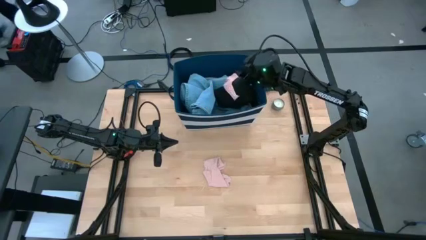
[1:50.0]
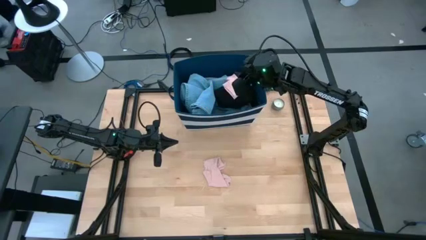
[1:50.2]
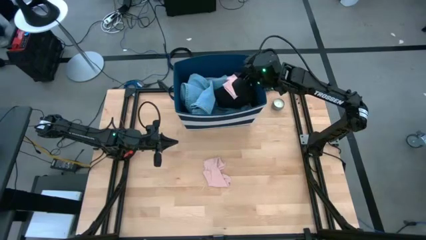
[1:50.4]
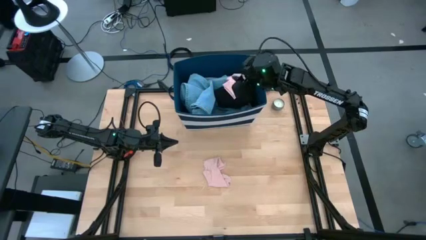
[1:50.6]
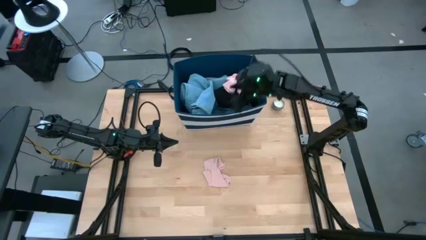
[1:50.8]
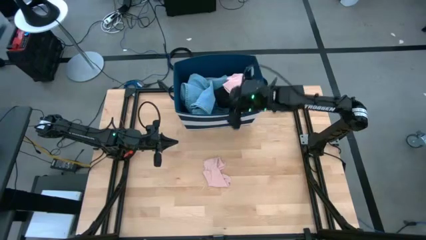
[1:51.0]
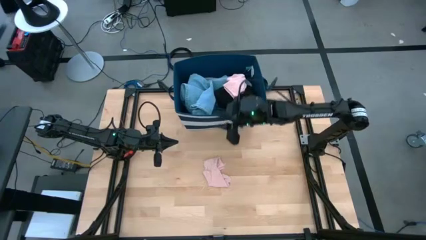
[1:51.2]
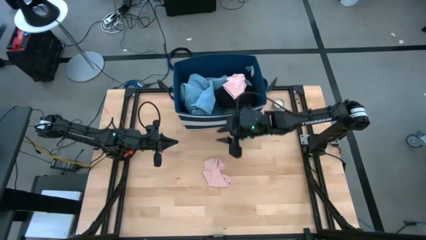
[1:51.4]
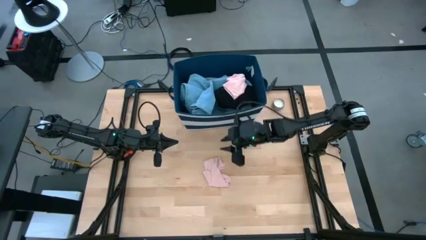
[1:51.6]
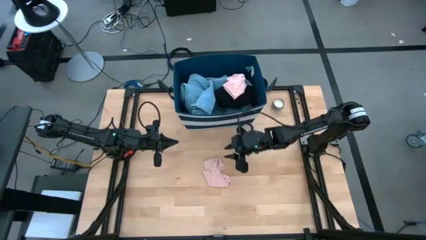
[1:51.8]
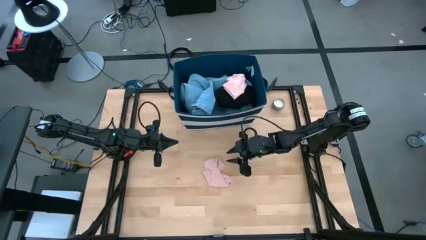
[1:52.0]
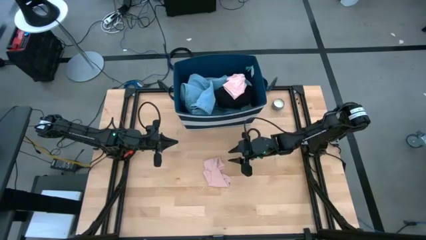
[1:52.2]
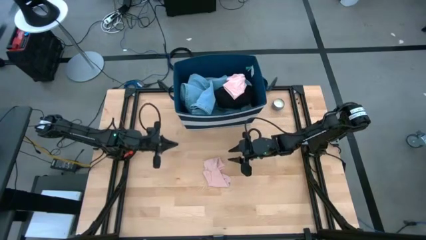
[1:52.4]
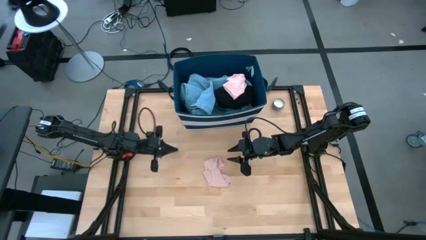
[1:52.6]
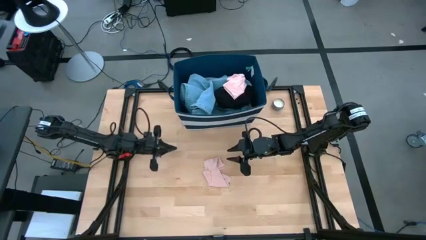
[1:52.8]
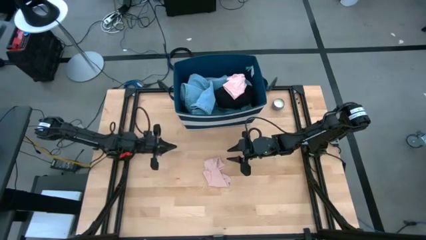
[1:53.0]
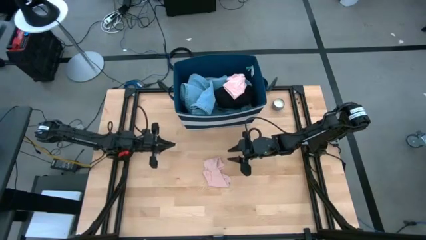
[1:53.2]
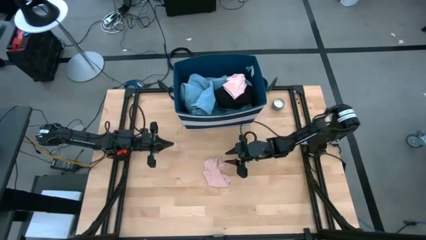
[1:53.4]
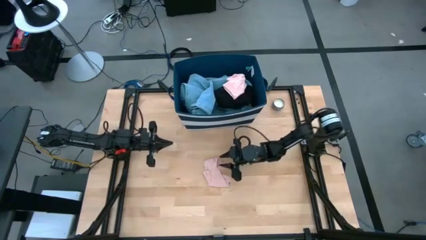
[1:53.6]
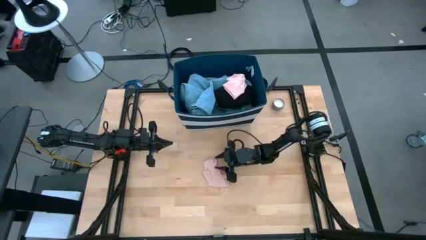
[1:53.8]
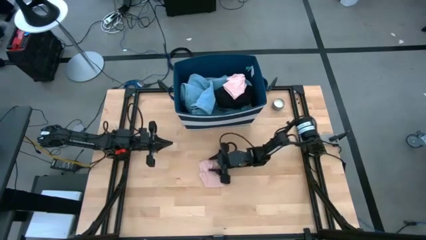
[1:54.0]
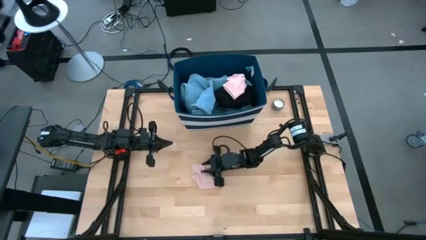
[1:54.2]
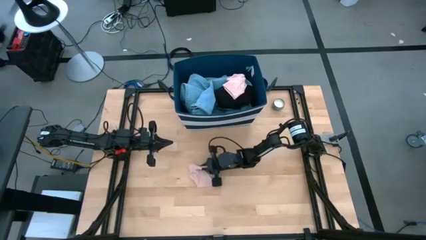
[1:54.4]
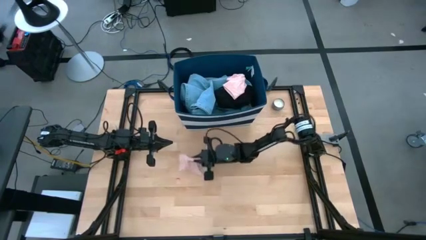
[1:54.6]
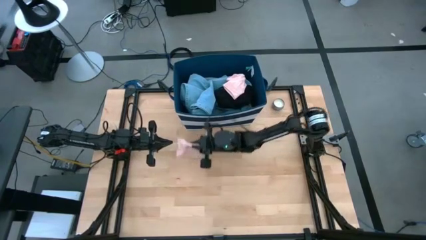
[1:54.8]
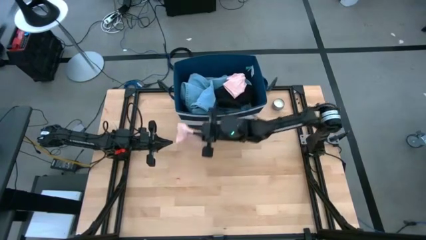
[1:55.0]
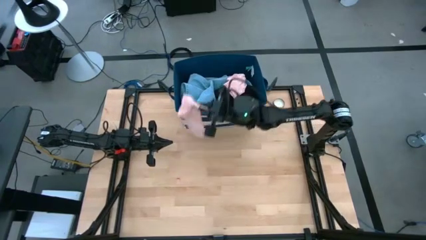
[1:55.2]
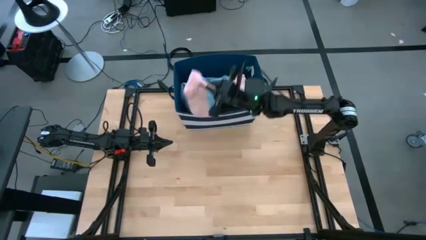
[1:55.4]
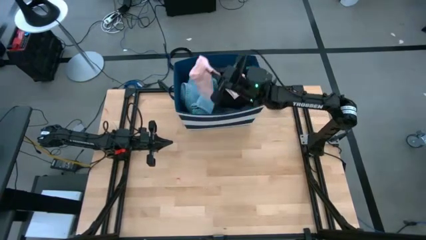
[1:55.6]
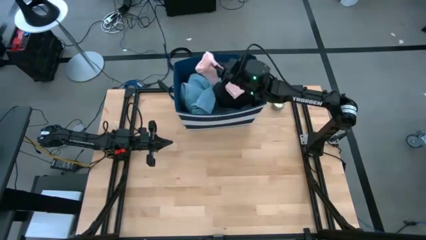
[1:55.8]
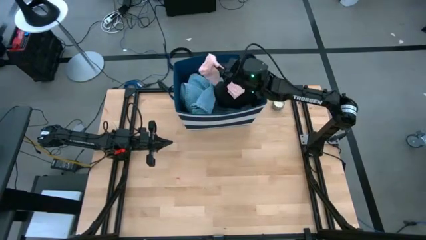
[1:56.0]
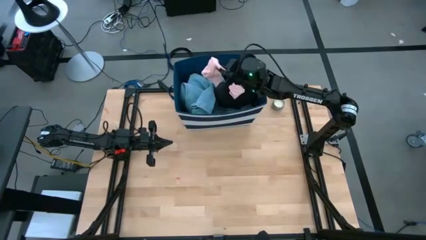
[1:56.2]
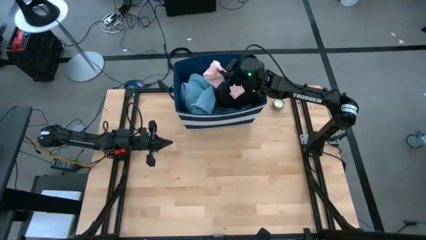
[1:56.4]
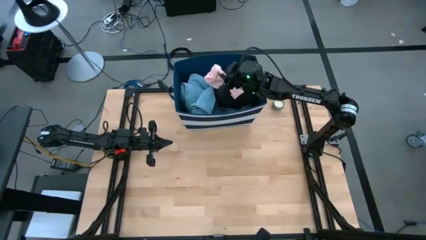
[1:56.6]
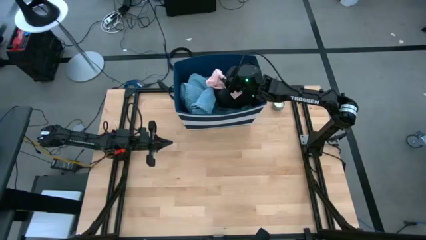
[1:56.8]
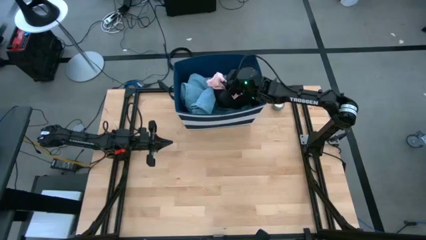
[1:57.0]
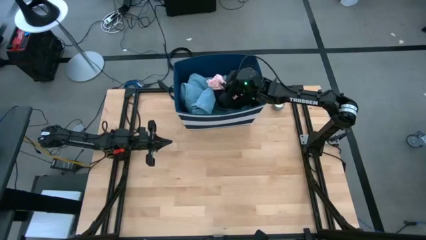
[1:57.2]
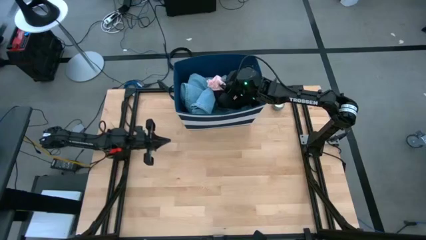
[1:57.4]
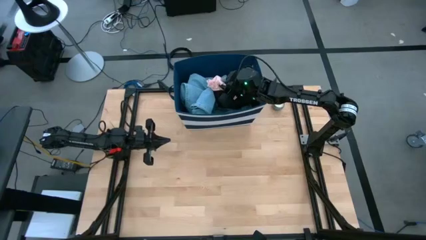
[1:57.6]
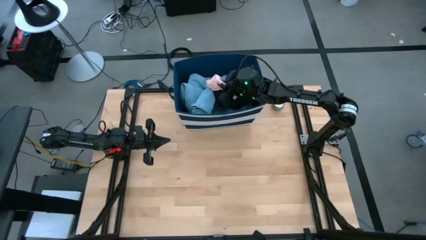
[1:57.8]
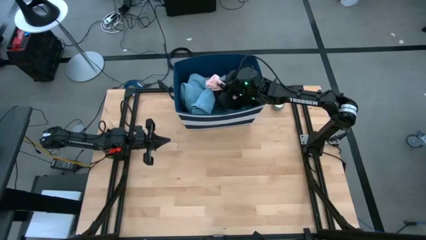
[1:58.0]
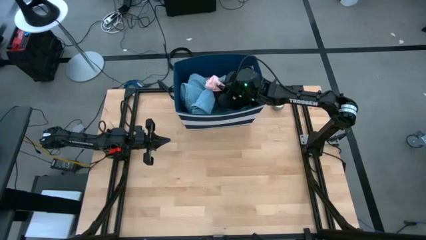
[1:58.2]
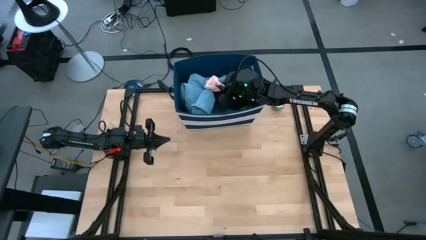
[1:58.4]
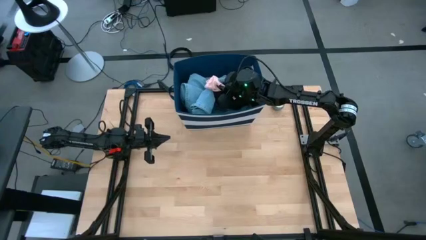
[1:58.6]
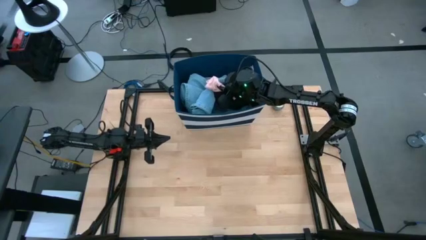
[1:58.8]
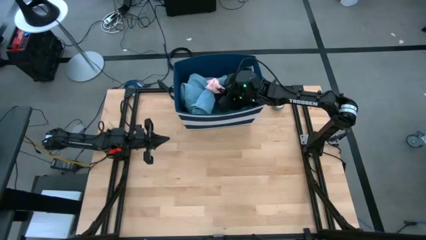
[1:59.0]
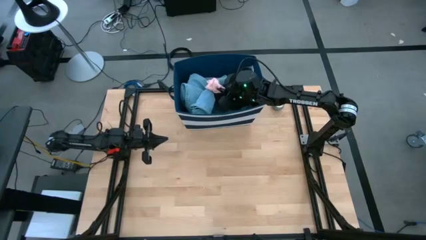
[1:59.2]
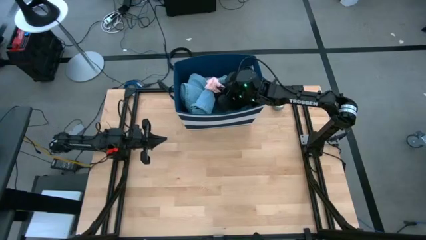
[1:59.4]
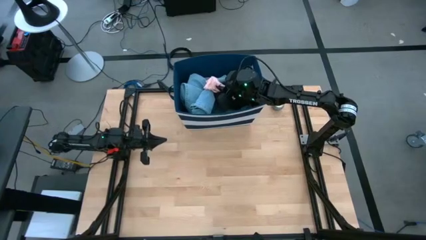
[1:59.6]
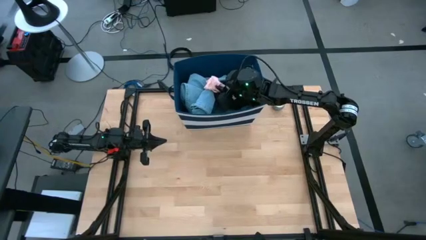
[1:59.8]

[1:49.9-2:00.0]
Task: Sort clothes
Put the pink sock into the blue organizer bin

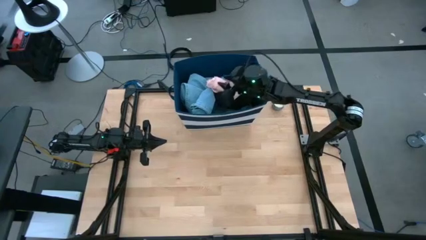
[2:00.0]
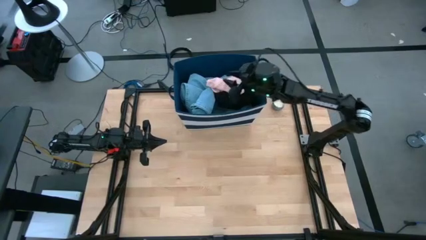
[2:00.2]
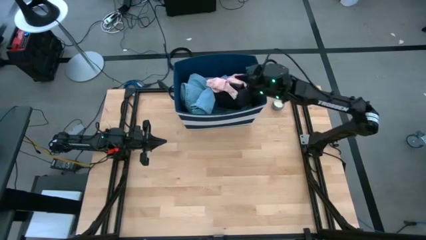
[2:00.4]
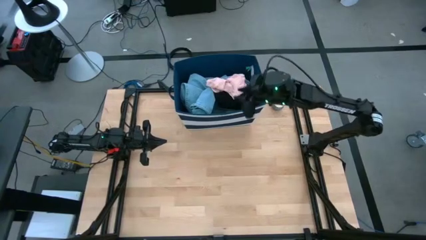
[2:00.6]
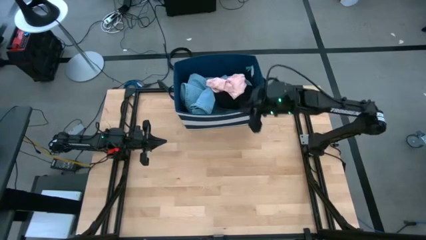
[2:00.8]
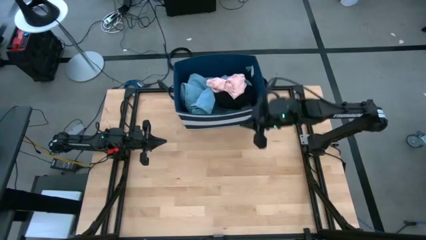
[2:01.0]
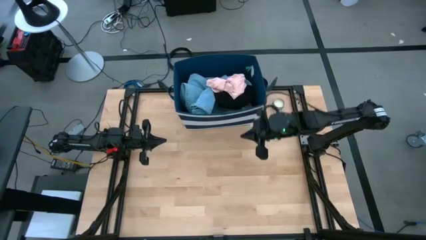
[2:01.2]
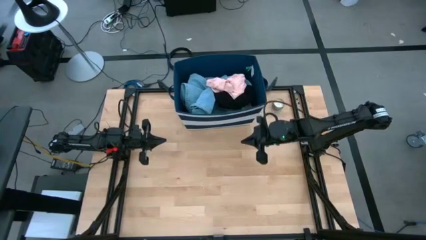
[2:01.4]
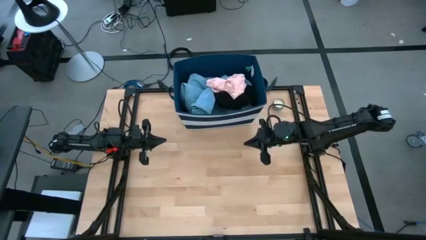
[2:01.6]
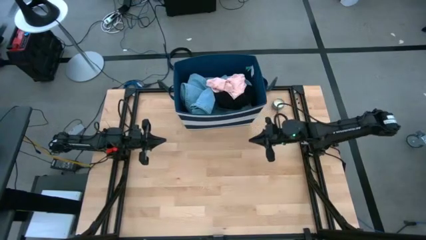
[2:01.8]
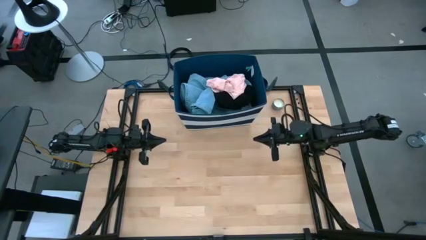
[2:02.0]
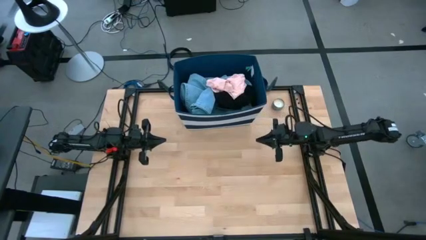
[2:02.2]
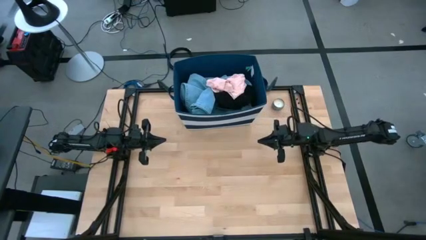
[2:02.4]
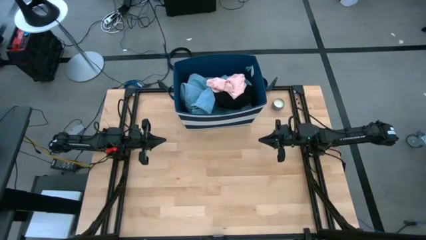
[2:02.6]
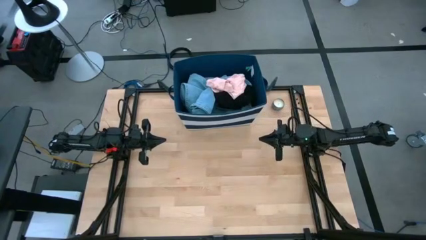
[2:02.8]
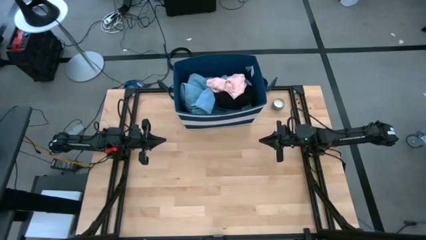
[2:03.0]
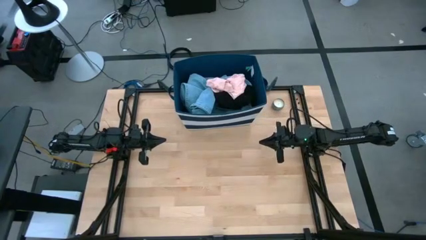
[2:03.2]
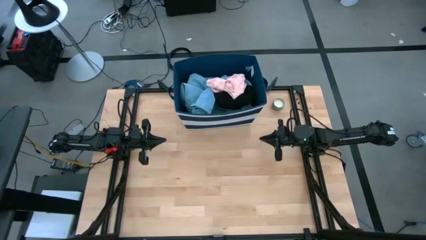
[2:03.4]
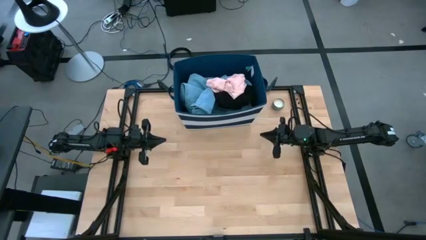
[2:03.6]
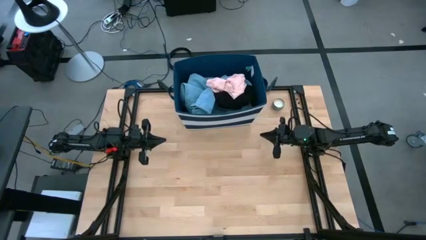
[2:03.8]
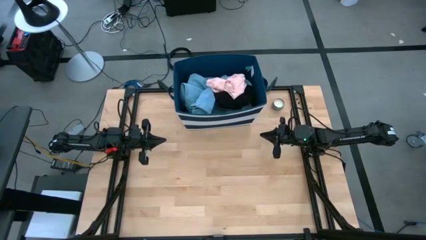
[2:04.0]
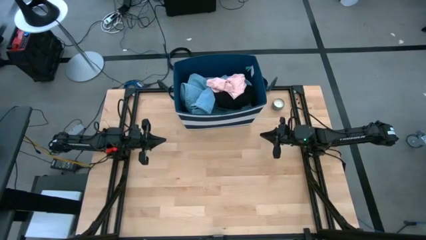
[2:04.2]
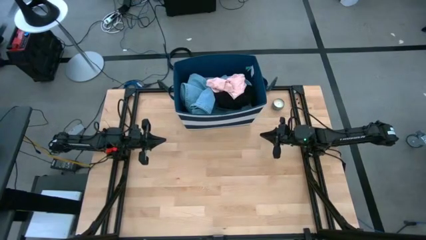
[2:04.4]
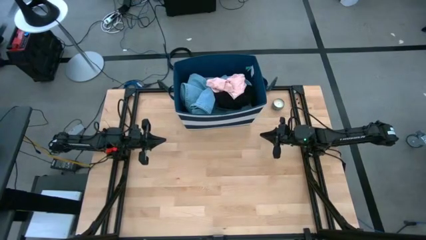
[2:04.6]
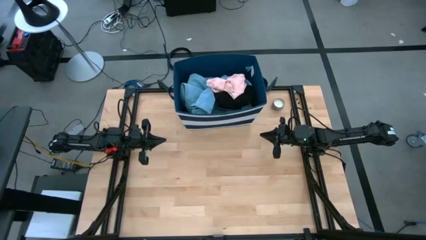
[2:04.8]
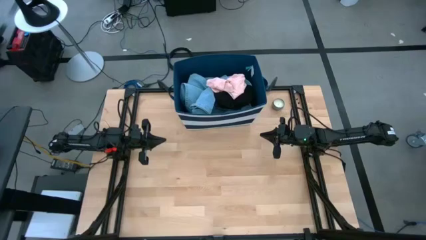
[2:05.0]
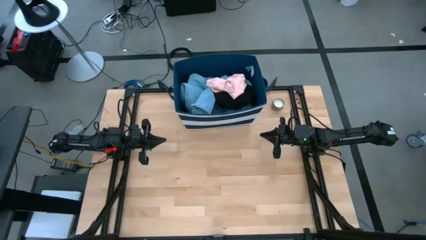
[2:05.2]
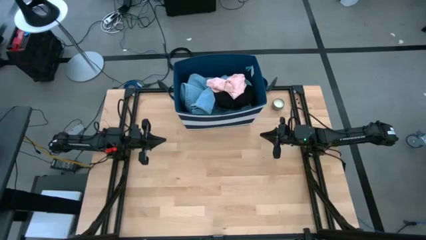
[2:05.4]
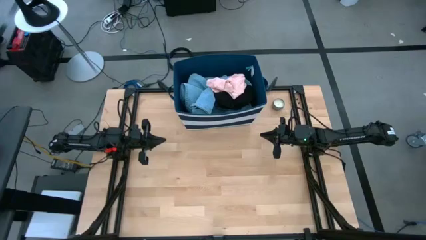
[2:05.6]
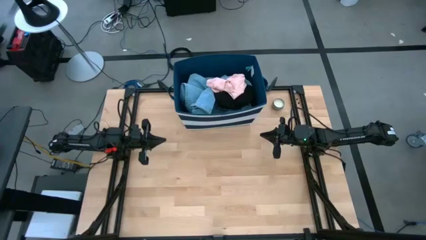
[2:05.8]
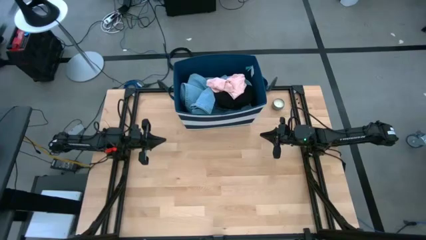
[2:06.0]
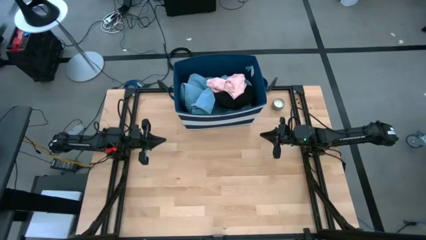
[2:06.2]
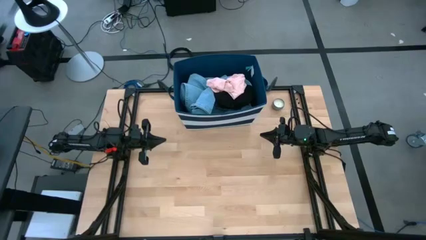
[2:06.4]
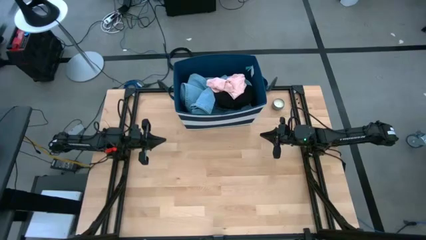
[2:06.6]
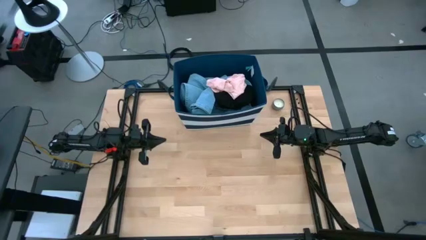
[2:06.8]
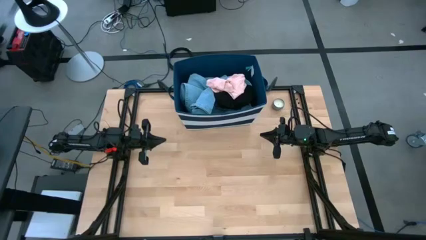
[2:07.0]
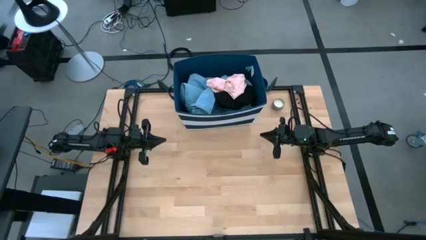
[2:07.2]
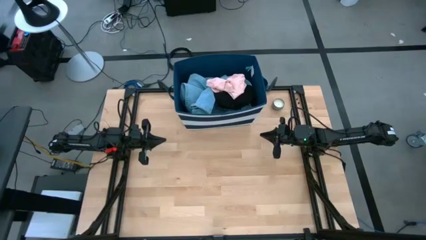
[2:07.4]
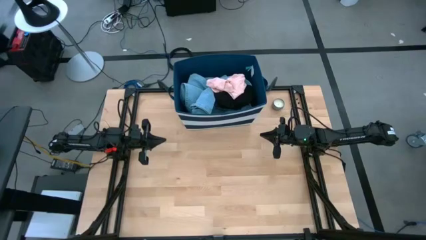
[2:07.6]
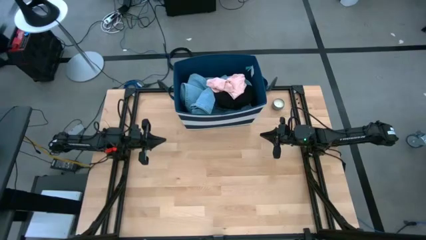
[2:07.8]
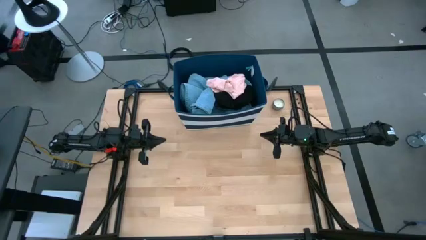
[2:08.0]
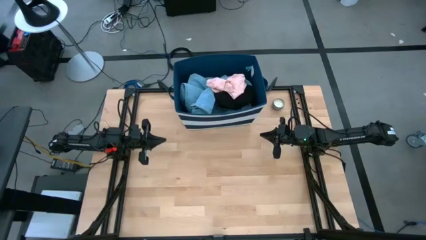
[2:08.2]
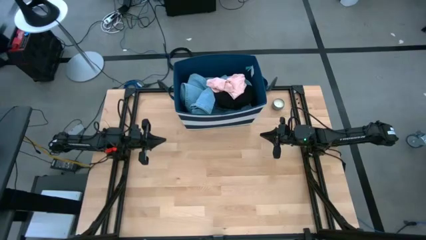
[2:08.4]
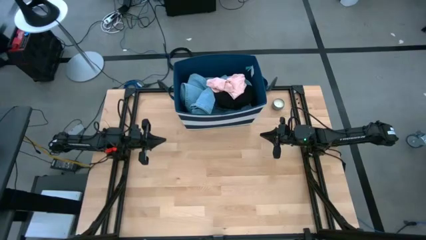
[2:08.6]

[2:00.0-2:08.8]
Return to Home Position
